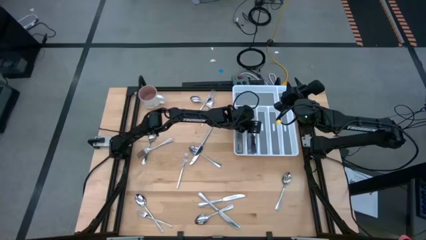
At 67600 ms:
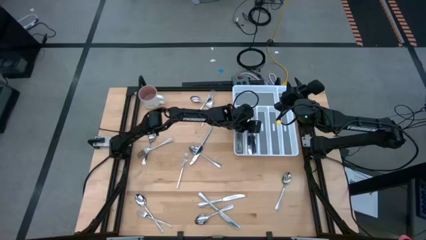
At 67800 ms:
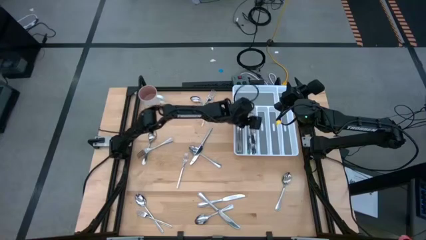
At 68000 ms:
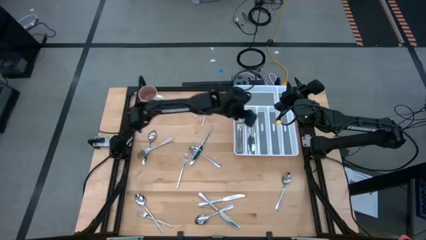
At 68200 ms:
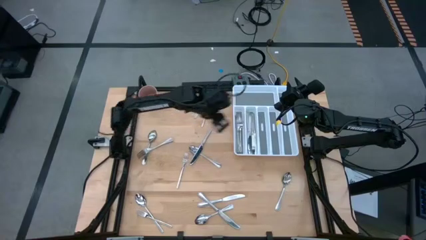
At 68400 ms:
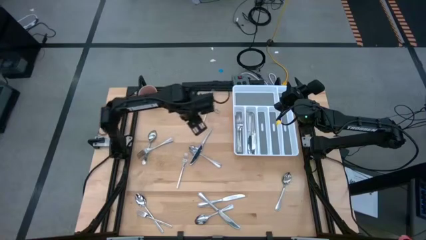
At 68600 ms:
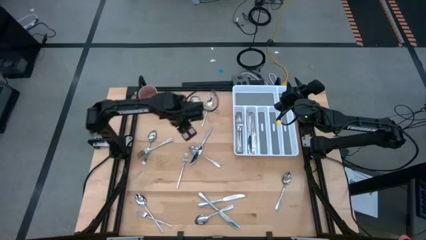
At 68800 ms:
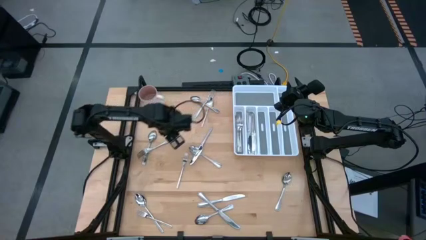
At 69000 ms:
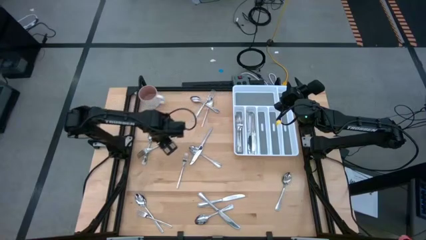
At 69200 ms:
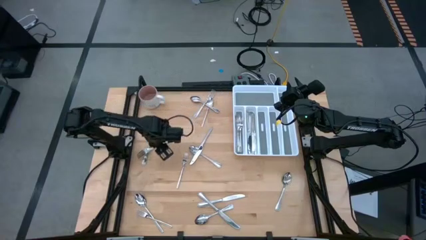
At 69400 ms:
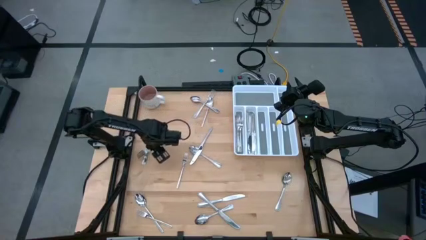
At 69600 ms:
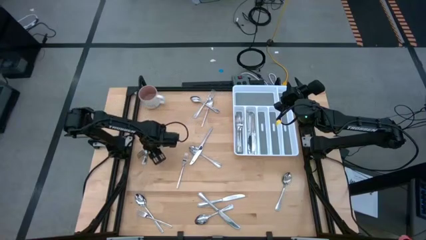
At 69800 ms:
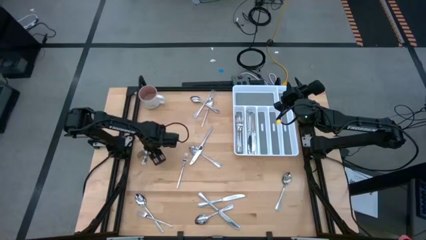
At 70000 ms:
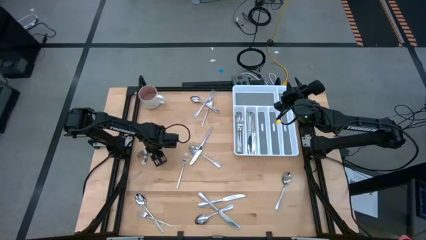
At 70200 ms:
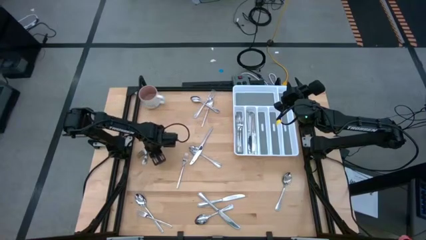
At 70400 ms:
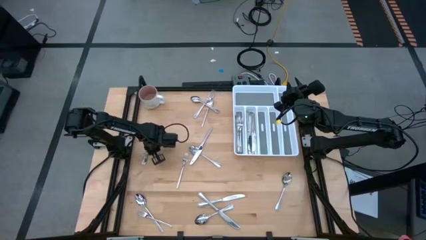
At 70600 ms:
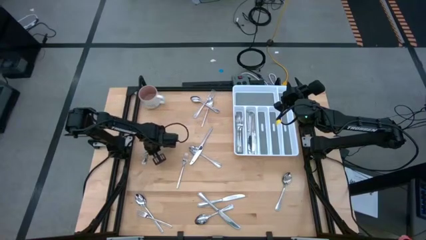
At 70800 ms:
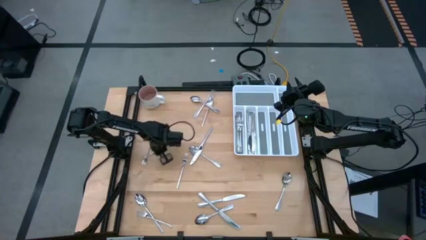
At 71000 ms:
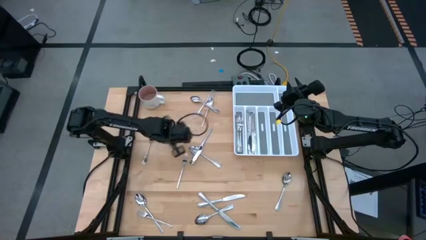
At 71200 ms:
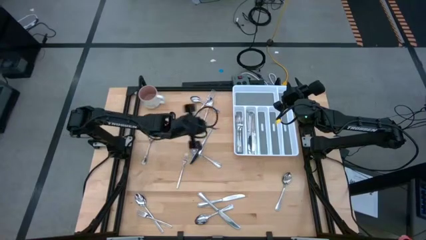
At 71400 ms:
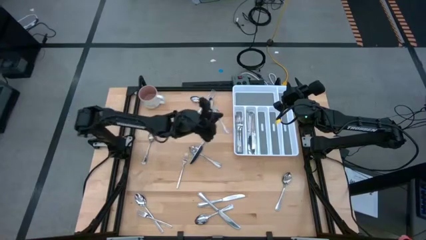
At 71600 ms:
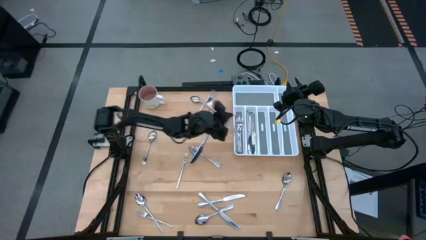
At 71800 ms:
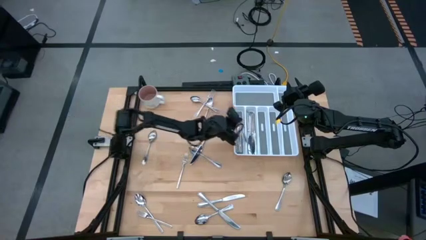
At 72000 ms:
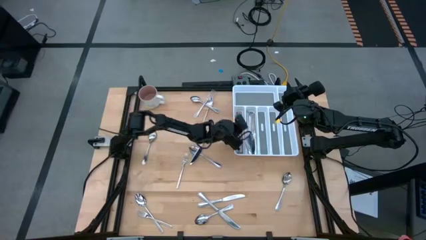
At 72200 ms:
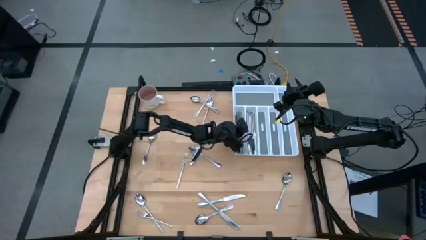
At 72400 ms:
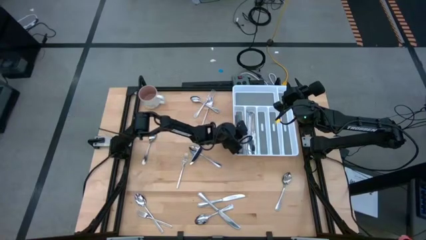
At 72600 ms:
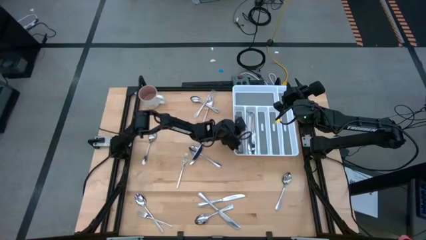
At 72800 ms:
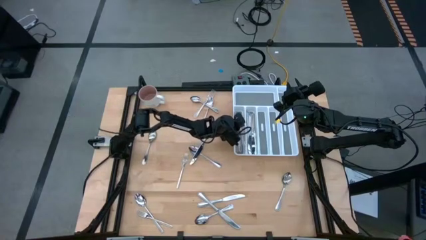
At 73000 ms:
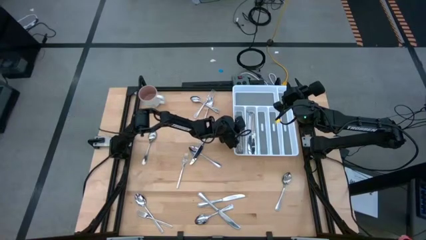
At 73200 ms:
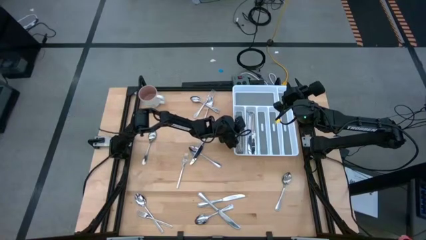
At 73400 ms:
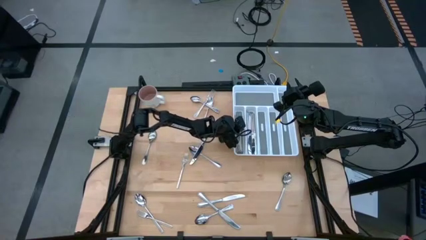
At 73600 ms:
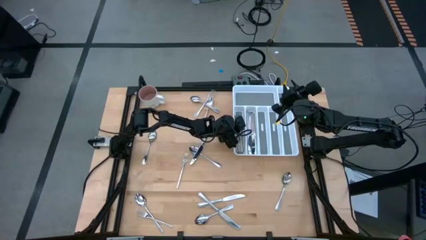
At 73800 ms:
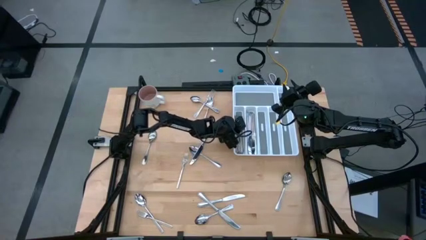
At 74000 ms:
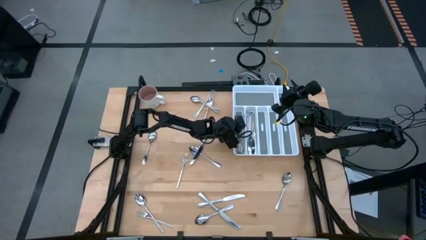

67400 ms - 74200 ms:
Task: Sort silverware
Put the silver fork into the left slot of the white silverware tray

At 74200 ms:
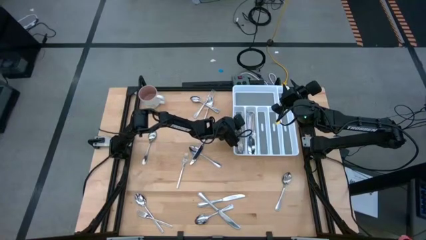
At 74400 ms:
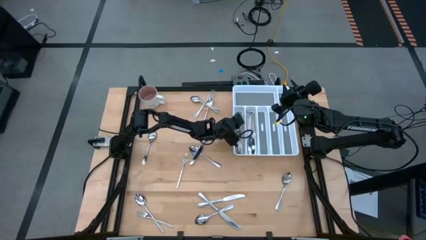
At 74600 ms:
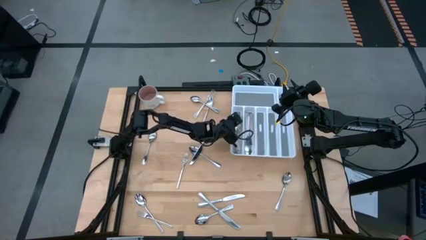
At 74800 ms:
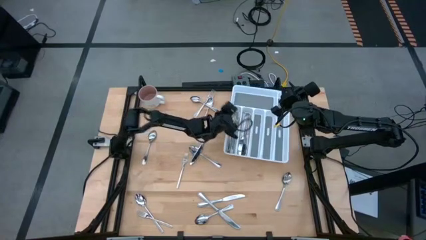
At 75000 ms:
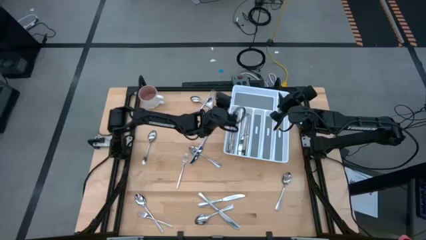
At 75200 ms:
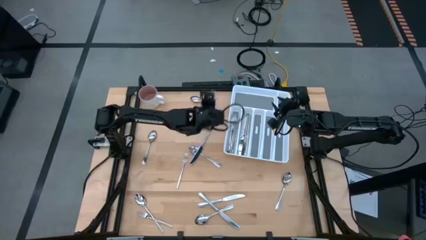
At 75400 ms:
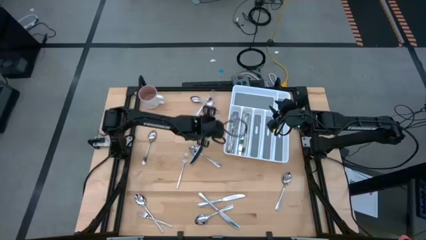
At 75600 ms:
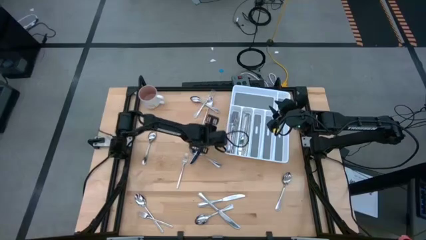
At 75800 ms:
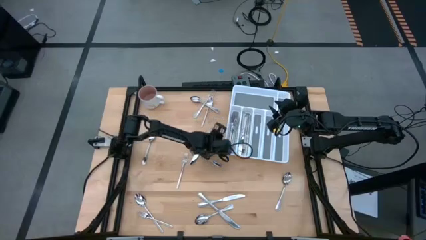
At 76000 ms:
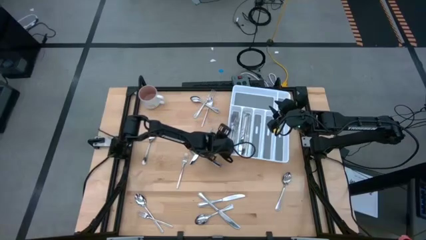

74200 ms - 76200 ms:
Adjust the white silverware tray

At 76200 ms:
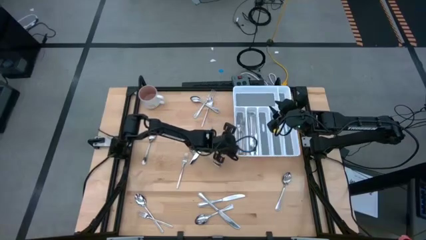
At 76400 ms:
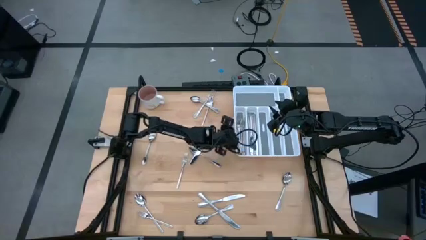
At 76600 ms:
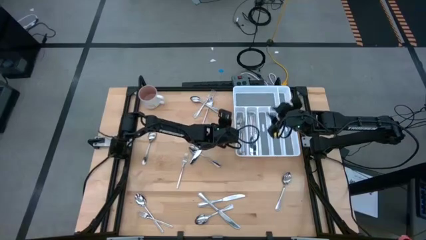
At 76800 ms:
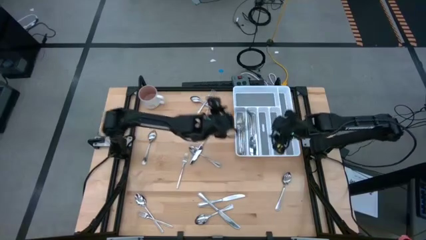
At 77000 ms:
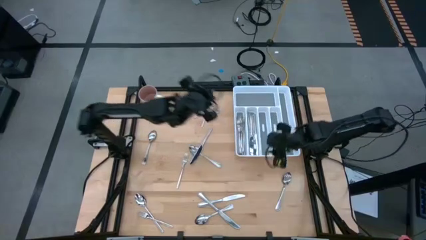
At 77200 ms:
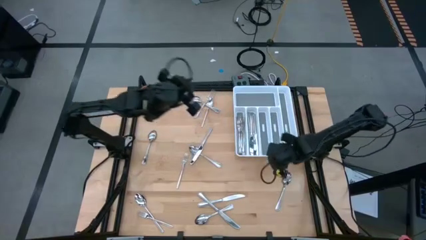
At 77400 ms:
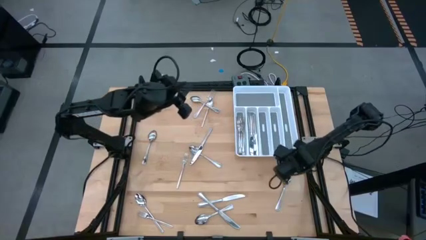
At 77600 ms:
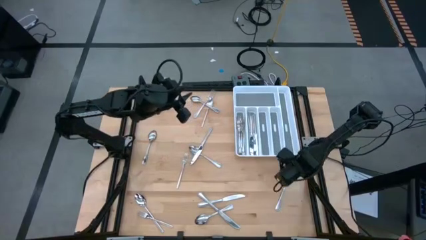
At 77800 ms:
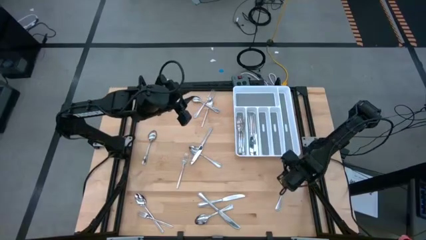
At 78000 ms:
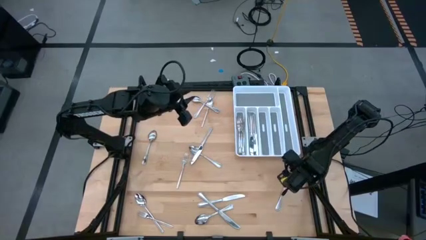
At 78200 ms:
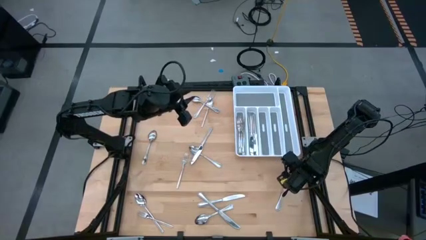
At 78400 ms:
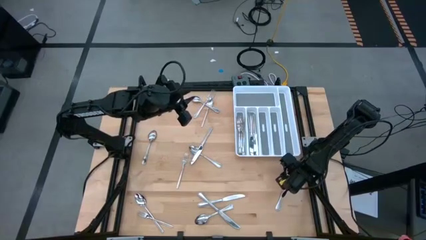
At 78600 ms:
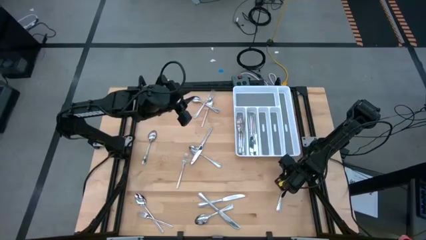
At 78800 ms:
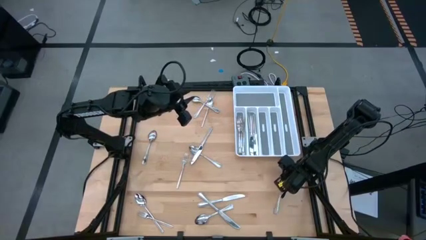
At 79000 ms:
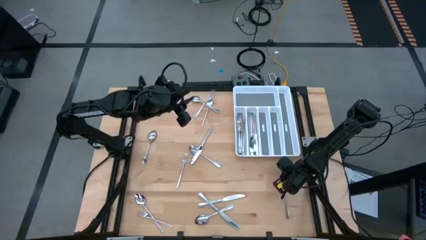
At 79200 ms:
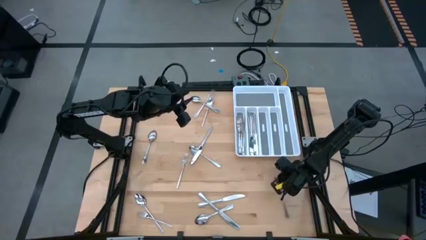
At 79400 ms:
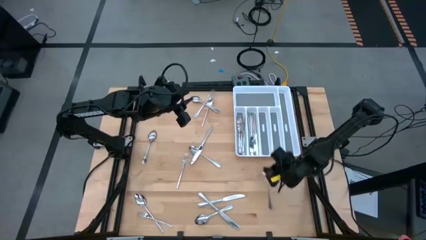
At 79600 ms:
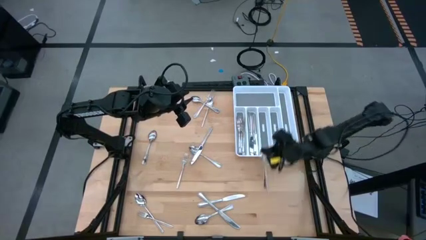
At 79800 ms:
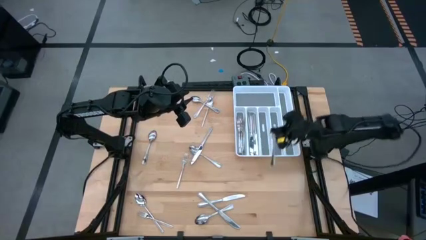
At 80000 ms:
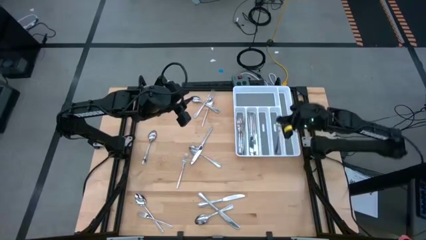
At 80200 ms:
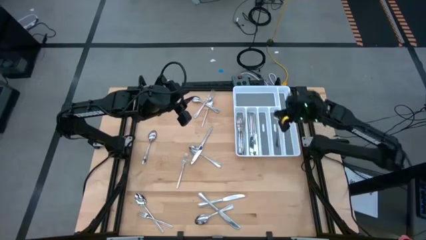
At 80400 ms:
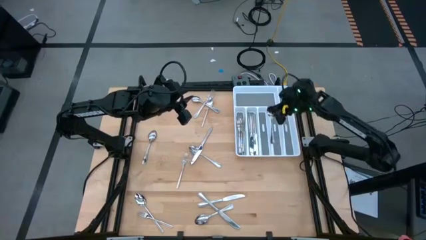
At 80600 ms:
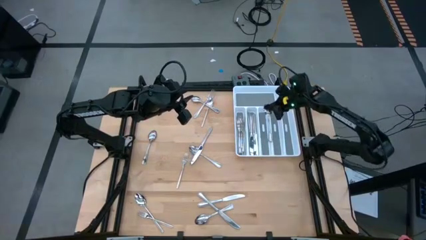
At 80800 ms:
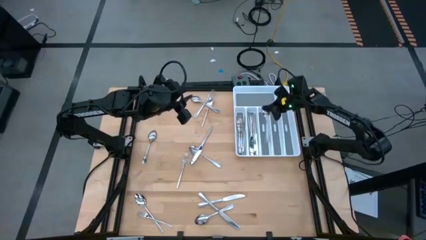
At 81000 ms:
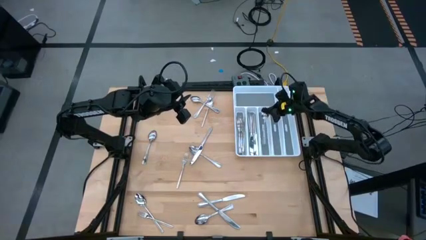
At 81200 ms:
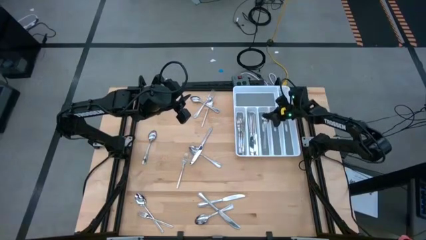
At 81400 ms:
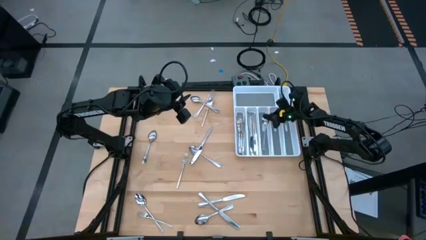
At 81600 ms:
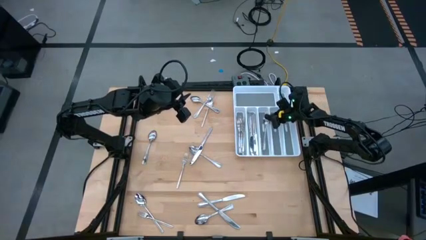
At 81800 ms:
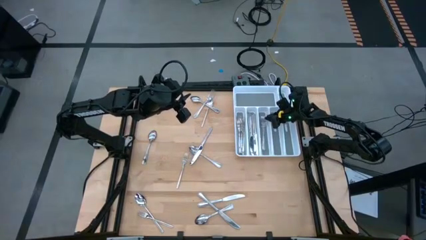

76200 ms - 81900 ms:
Put the silver spoon into the middle right slot of the white silverware tray

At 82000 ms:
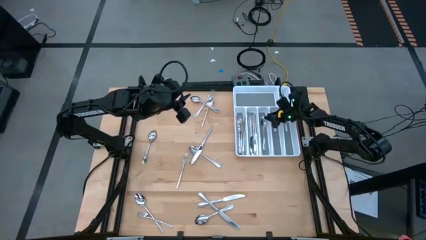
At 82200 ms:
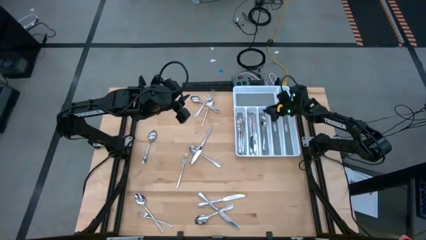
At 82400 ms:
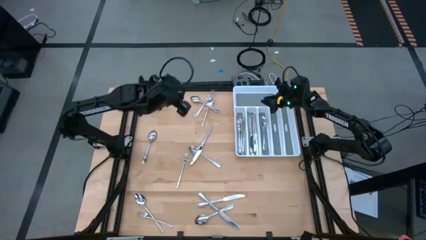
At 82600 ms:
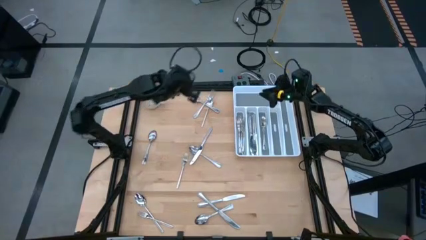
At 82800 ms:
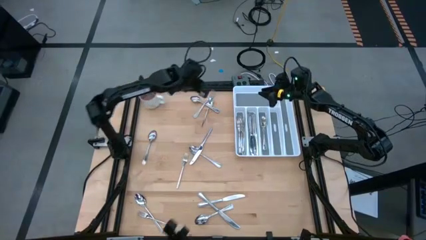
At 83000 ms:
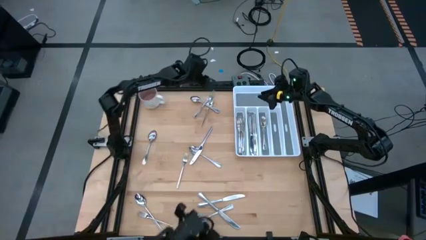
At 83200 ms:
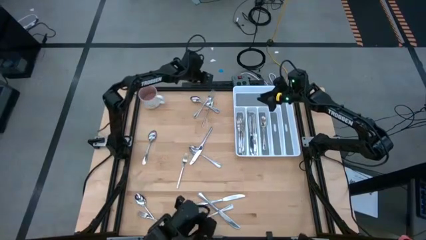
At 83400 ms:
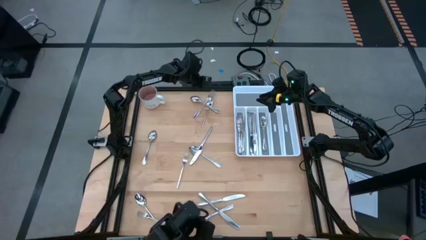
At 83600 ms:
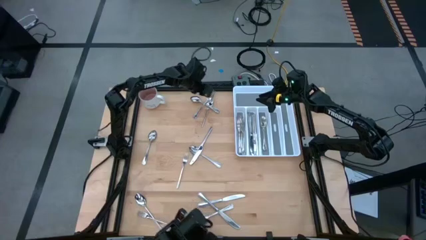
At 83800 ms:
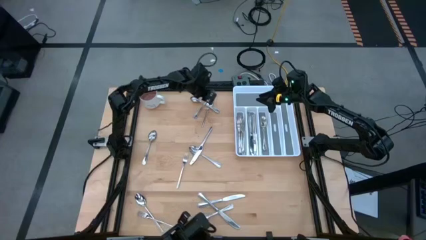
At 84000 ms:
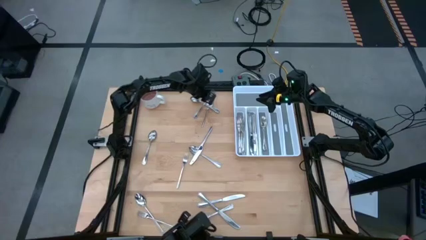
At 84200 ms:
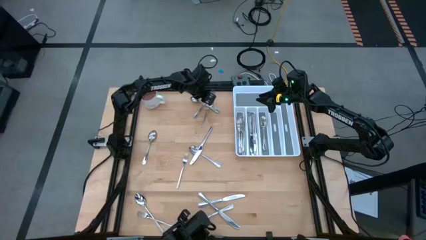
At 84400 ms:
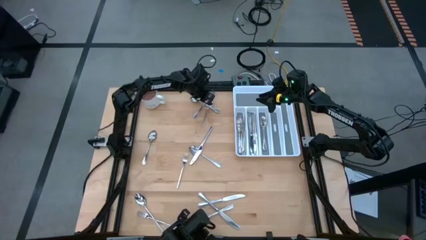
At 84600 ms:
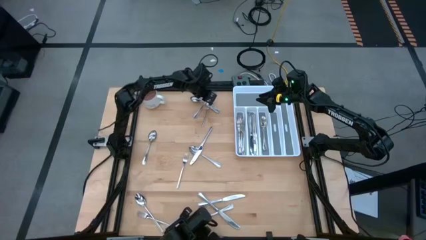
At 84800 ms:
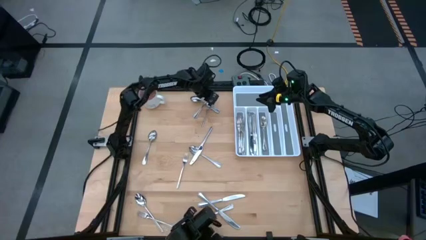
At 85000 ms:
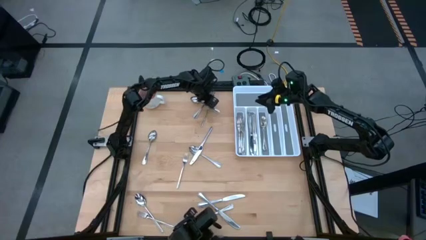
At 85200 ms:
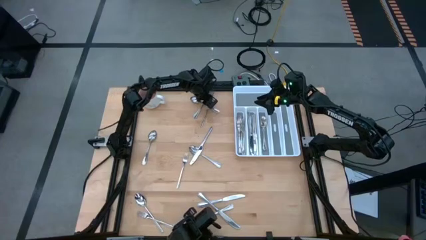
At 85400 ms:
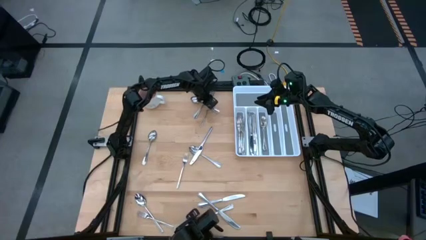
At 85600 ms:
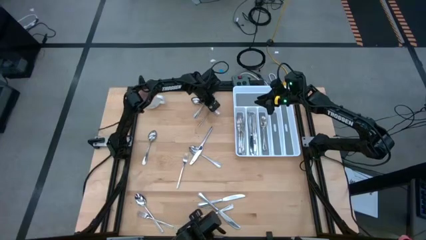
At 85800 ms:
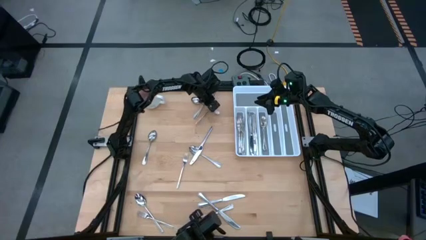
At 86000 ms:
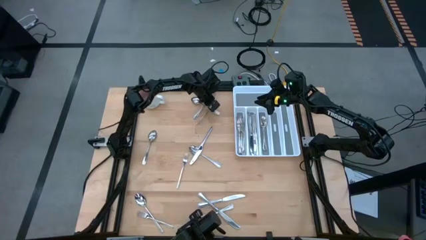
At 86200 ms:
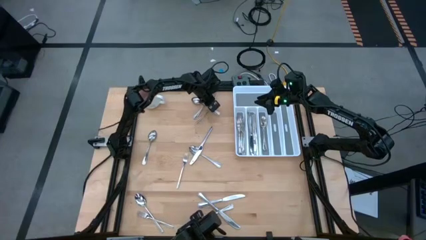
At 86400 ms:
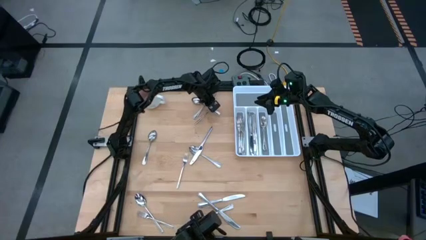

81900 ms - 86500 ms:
Put the silver spoon into the middle right slot of the white silverware tray
